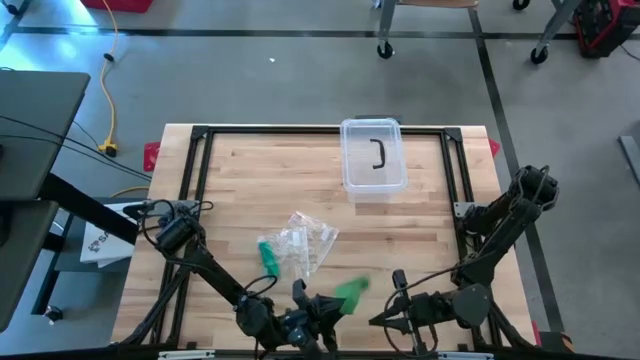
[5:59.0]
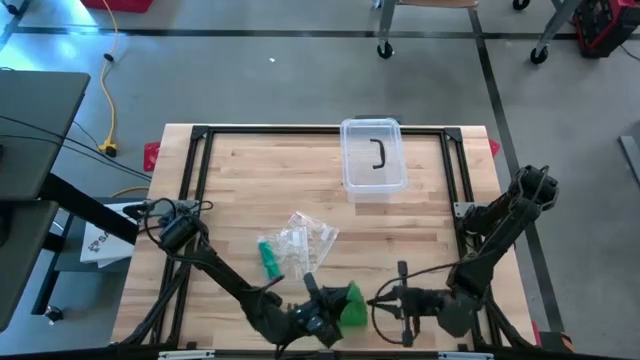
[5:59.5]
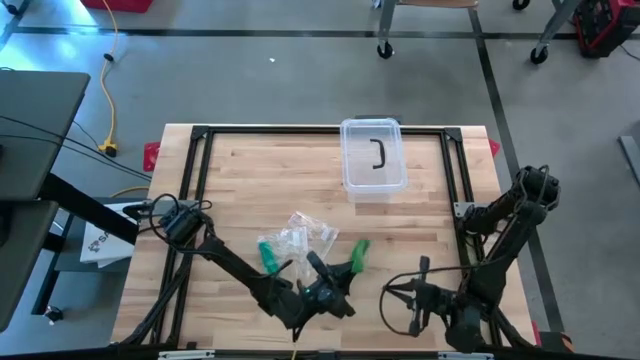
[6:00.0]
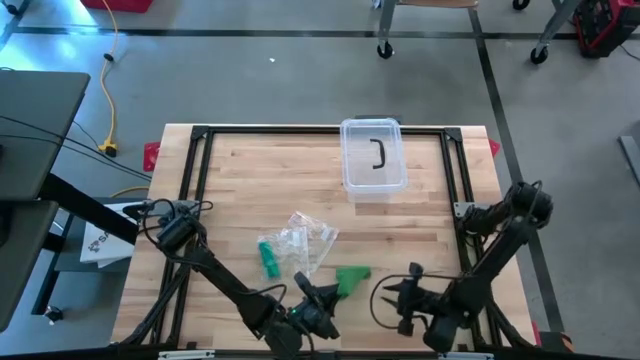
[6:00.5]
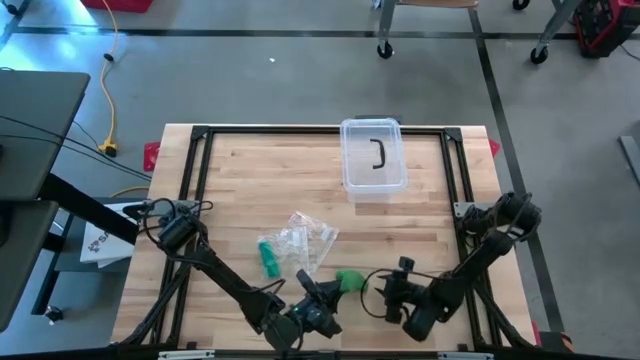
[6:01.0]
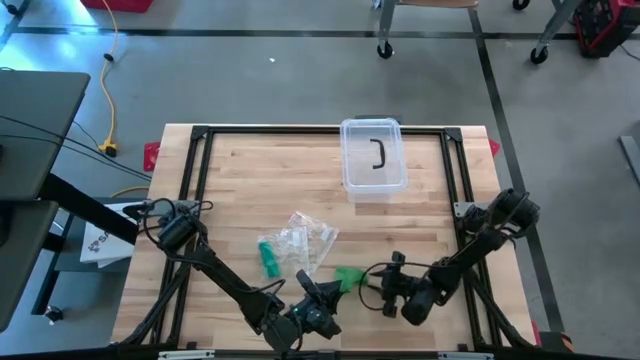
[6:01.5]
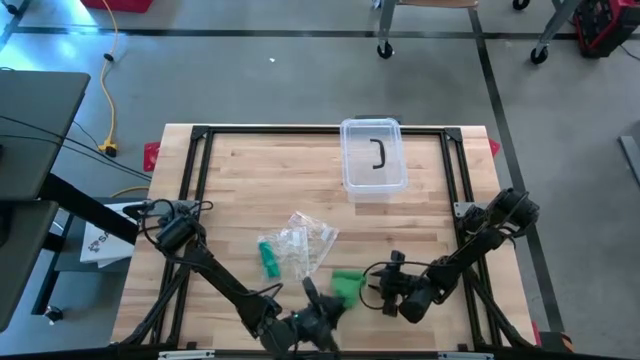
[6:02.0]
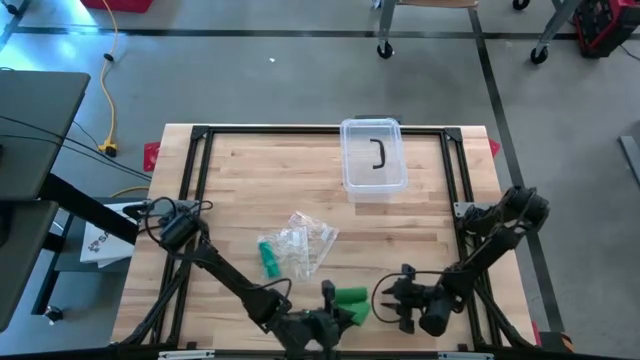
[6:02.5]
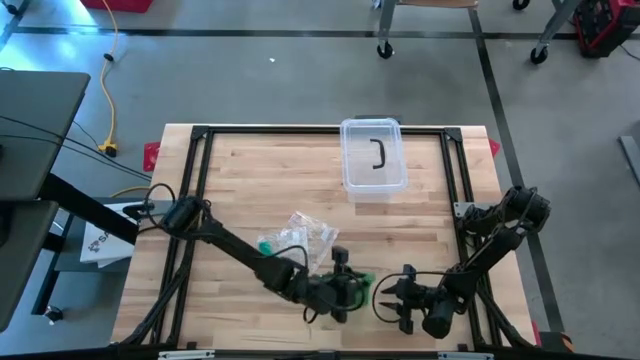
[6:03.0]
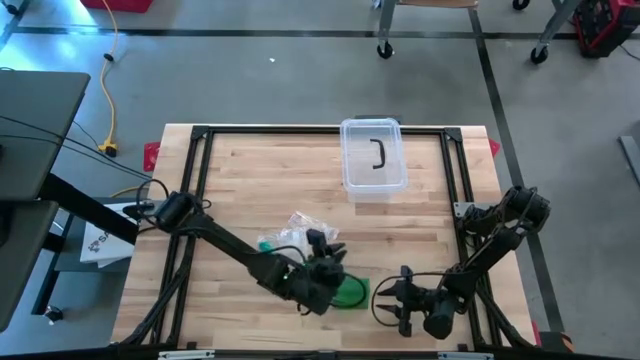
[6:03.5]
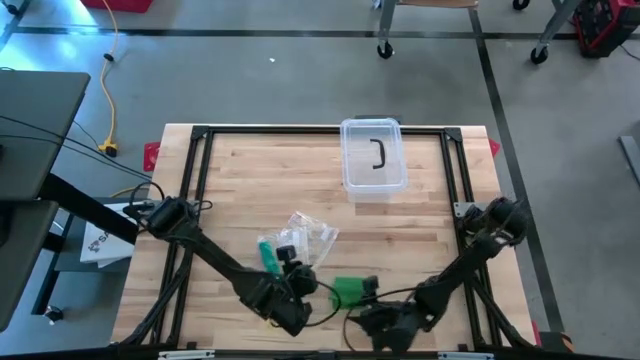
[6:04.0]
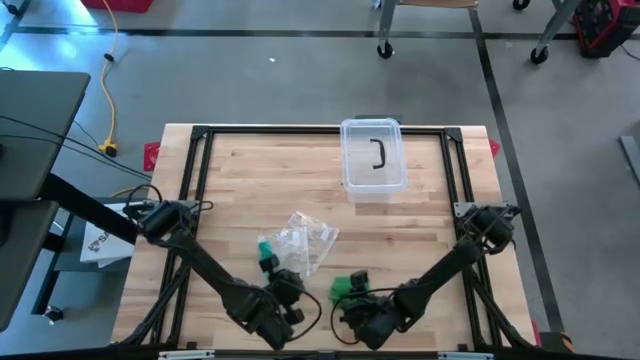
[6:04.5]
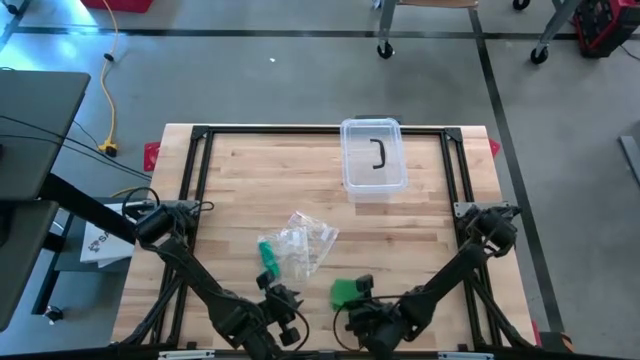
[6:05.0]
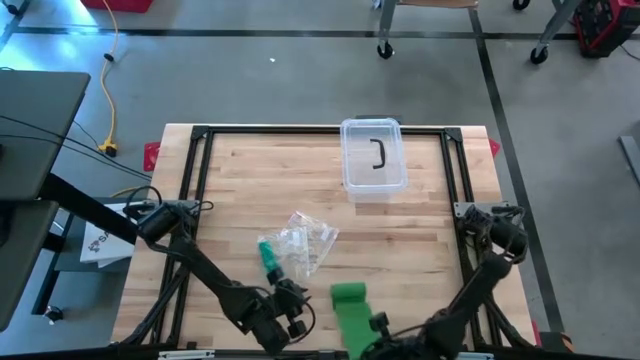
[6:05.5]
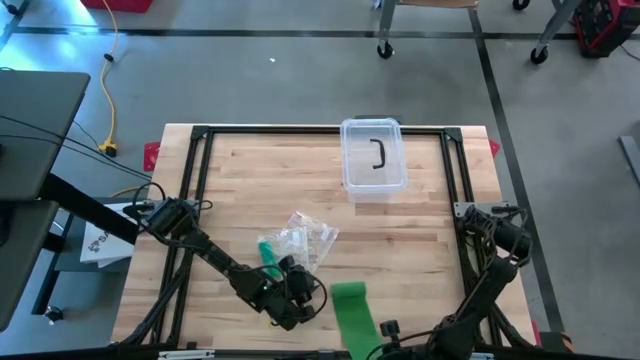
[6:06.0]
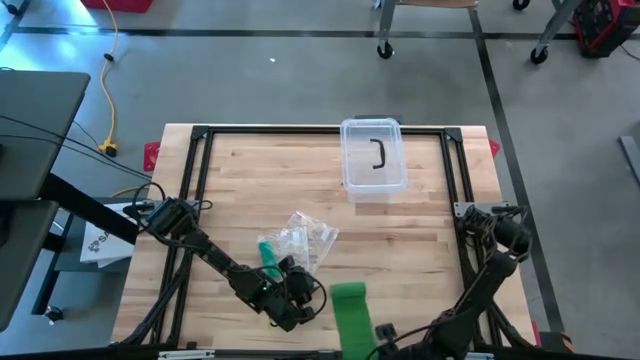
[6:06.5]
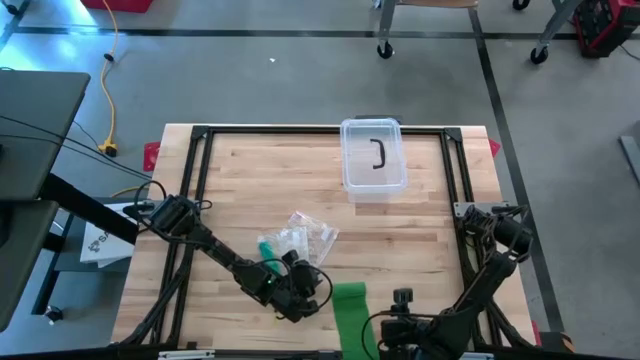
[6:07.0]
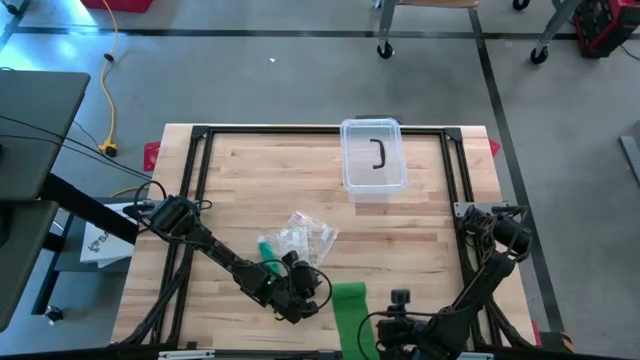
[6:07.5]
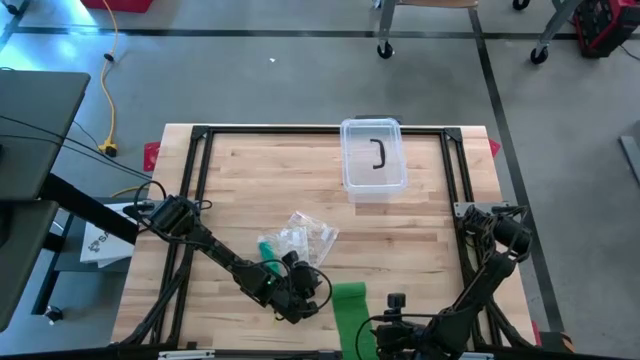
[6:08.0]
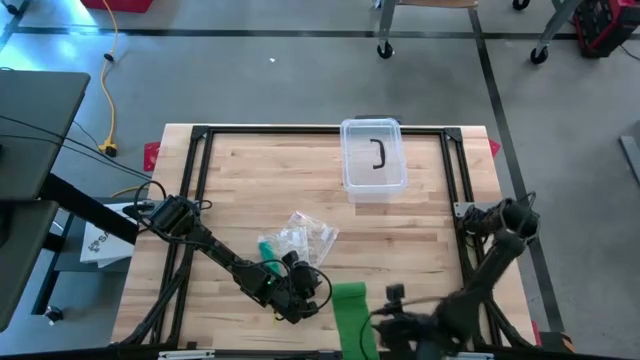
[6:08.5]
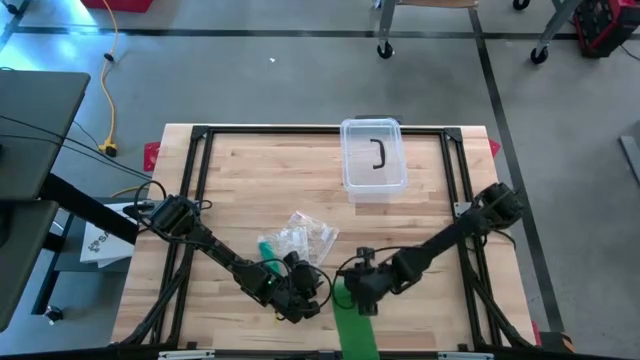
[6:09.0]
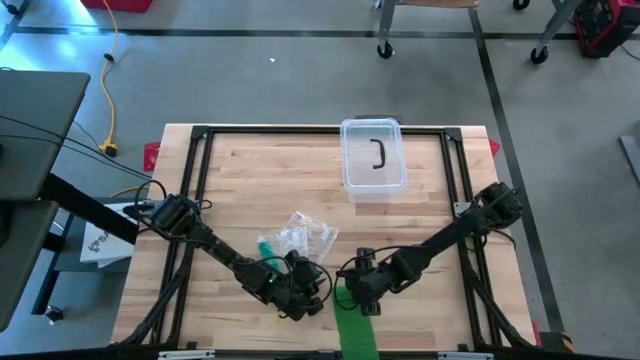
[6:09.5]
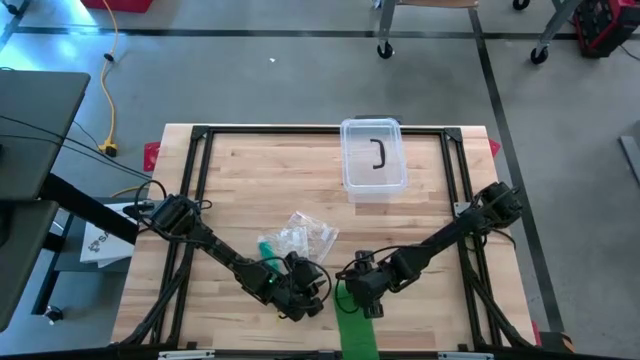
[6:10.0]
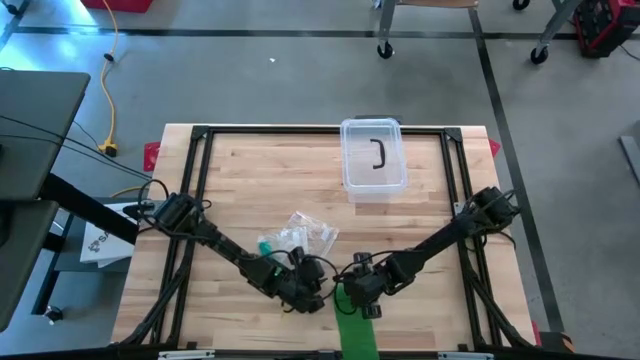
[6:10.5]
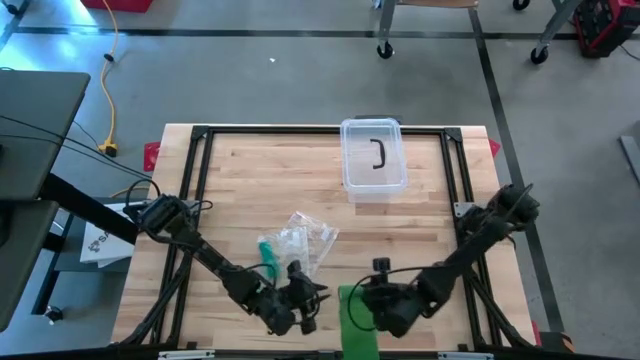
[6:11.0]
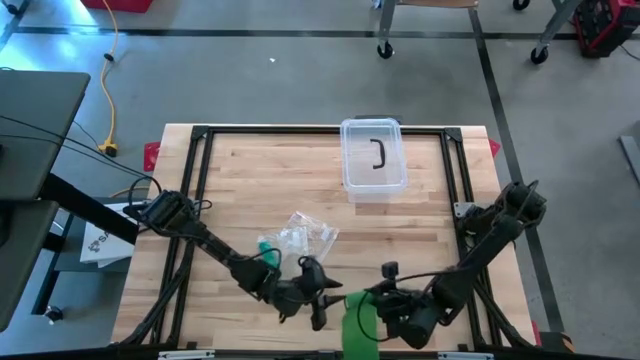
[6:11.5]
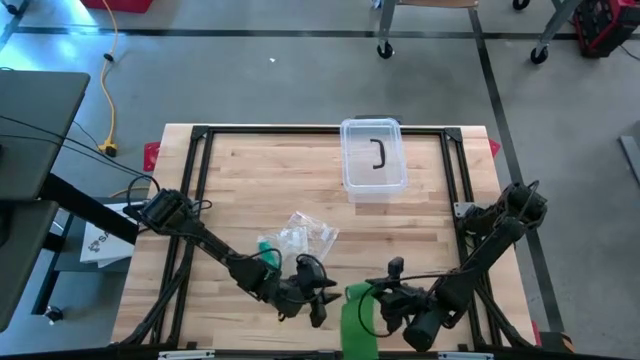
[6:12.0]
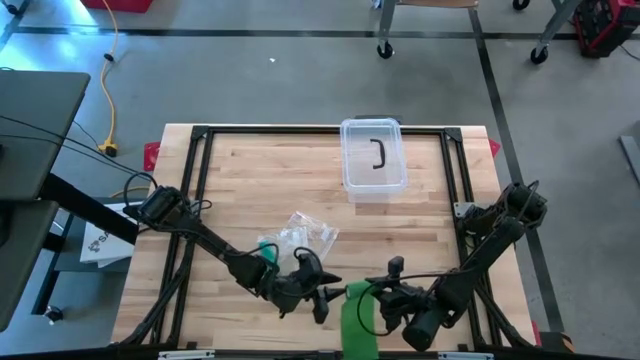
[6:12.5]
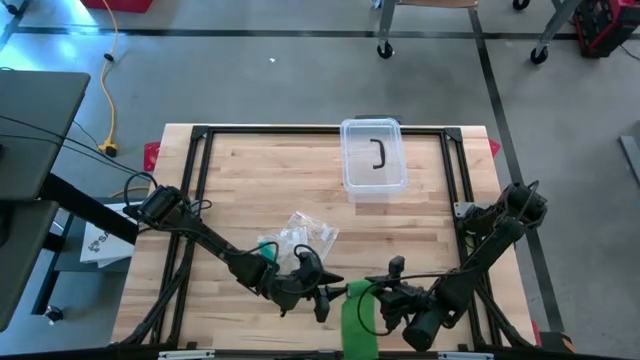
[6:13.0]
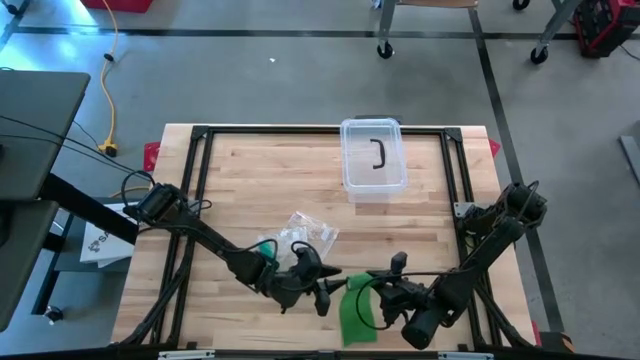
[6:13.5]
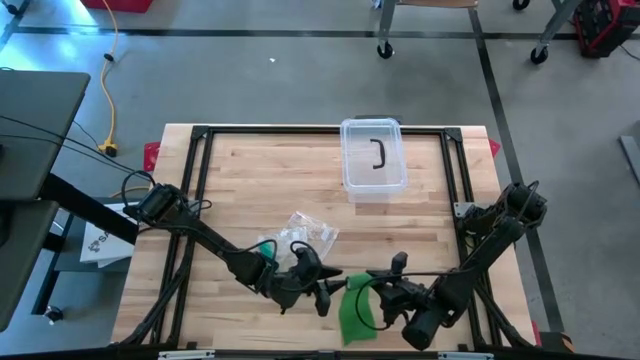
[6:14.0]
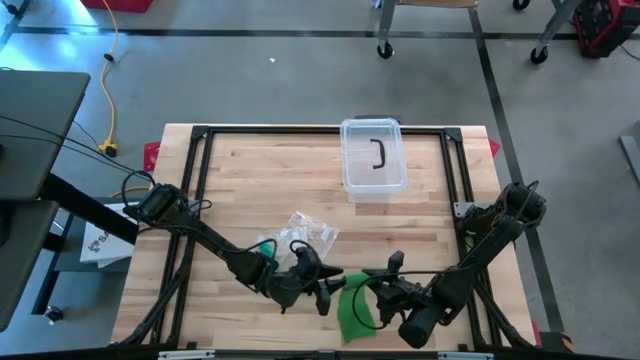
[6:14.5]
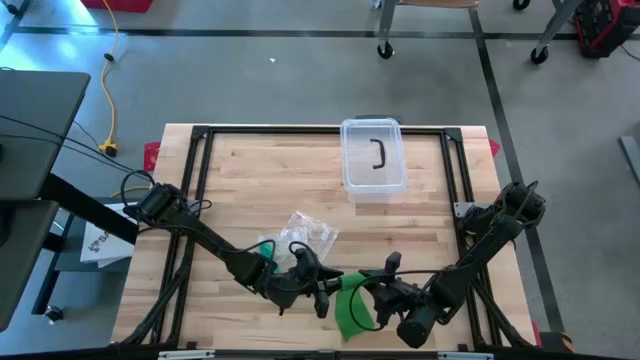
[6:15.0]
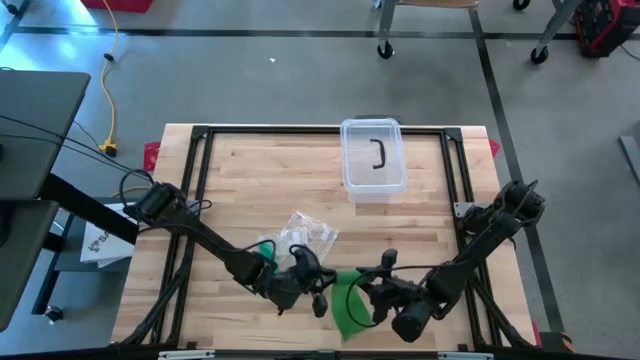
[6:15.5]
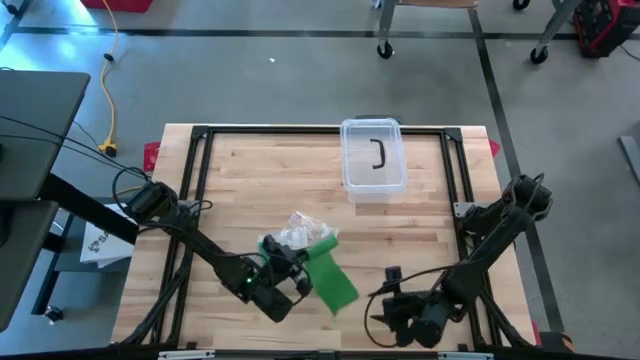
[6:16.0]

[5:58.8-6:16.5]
Task: Roll bandage
Roll the green bandage
